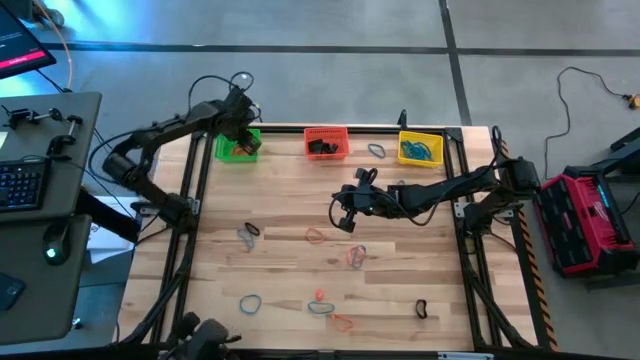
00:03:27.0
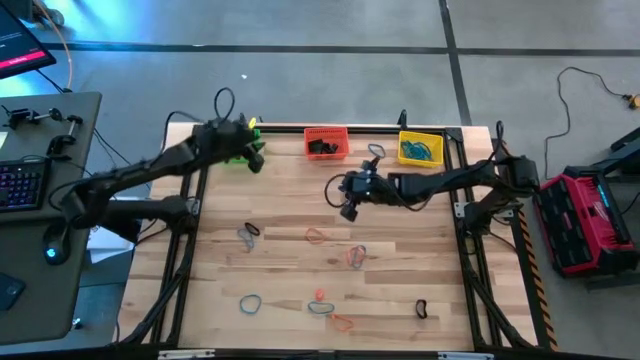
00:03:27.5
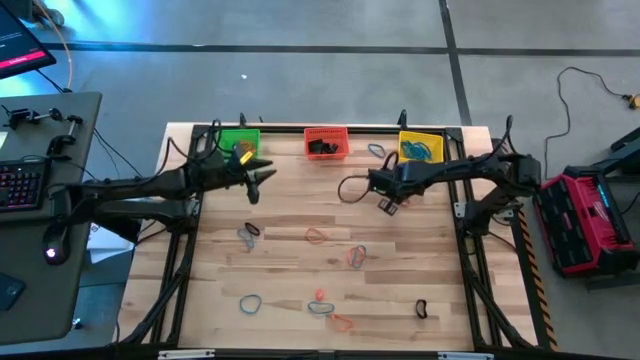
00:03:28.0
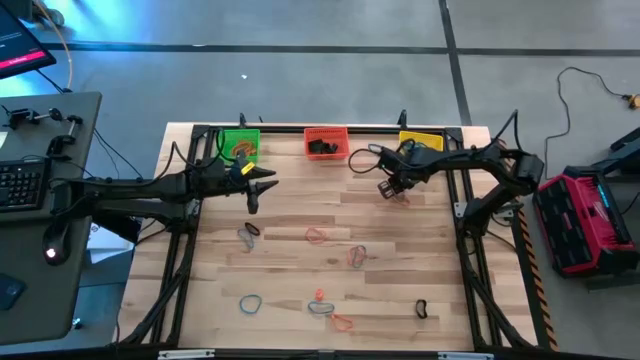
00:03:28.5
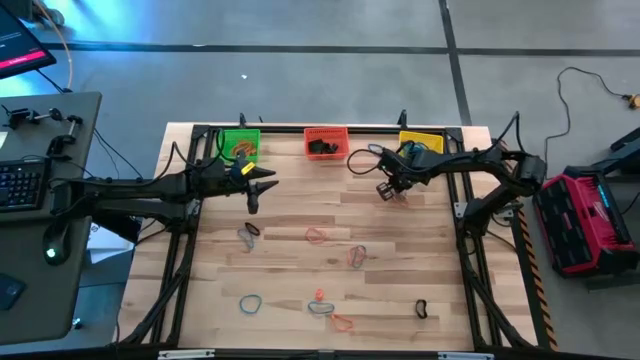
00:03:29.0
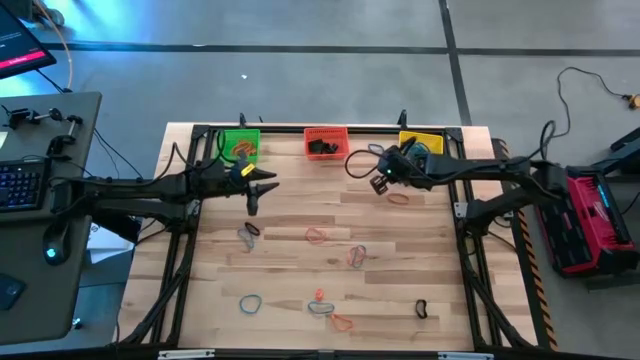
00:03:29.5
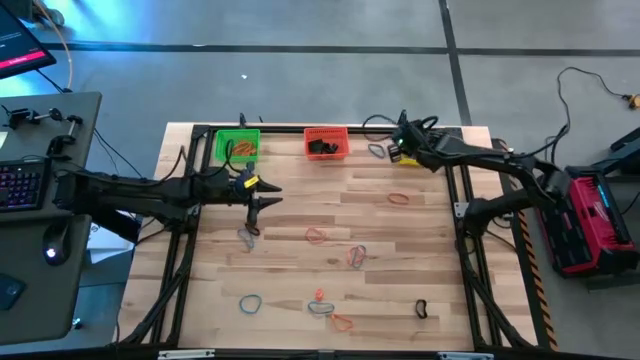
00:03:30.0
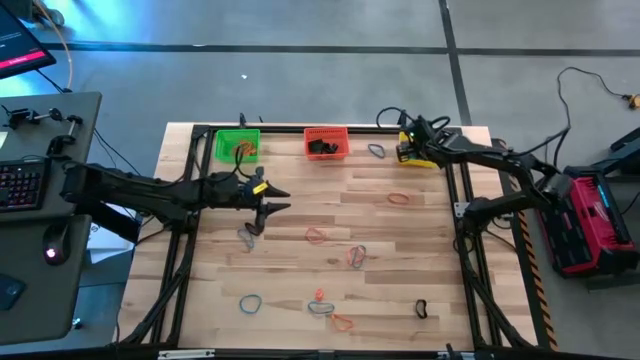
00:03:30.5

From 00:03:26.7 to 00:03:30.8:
Task: Sort rubber bands into baskets
Put the blue rubber band into the yellow bin

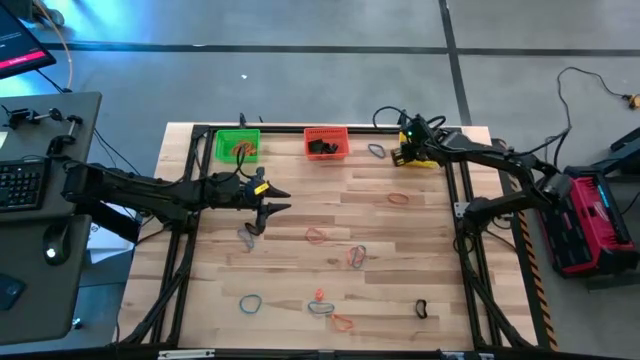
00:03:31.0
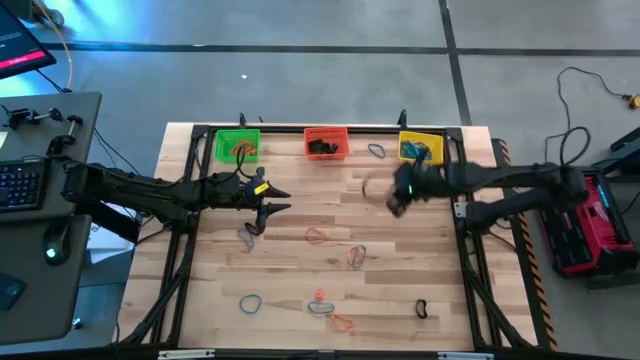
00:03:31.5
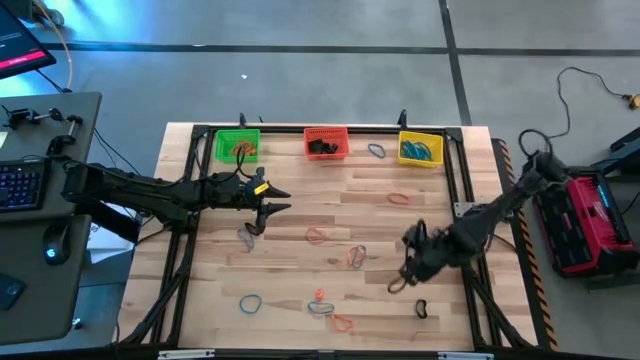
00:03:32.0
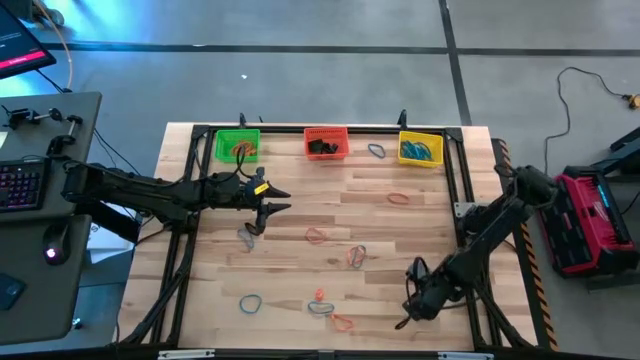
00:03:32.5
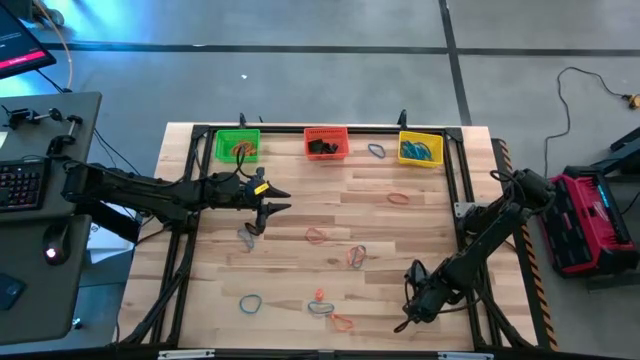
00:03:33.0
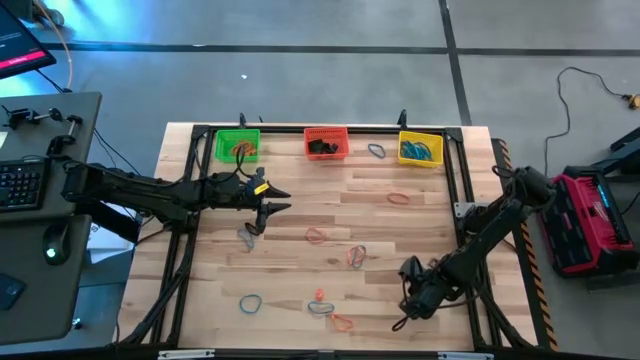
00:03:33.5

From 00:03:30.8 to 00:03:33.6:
Put the black rubber band into the orange bin

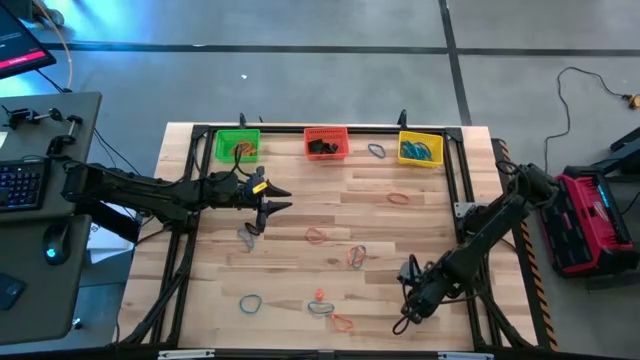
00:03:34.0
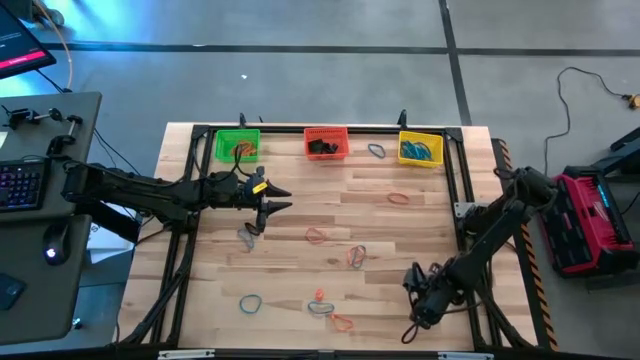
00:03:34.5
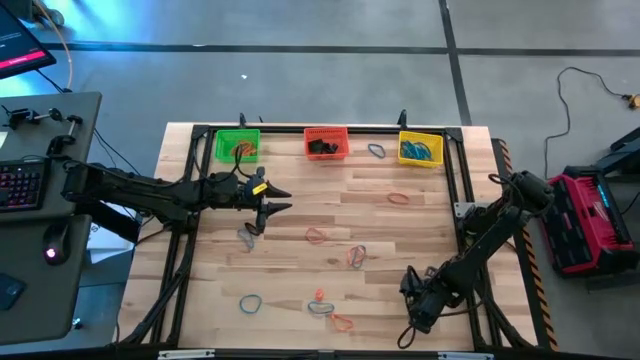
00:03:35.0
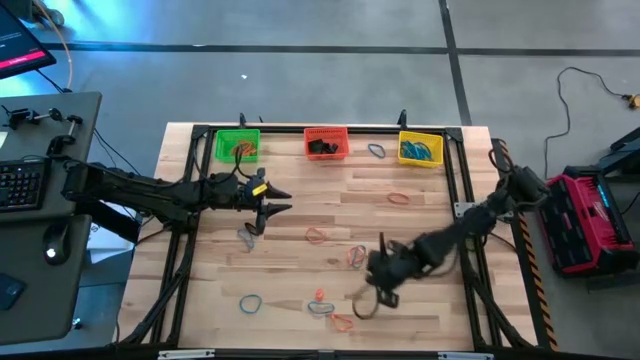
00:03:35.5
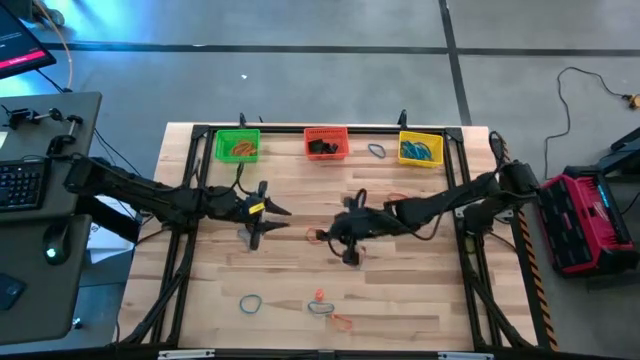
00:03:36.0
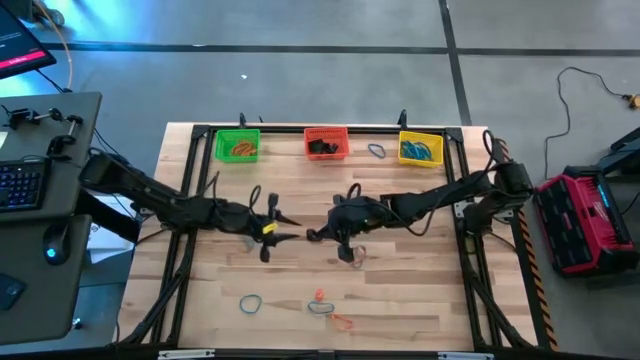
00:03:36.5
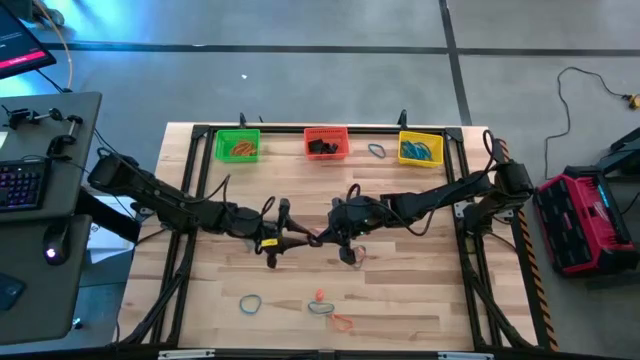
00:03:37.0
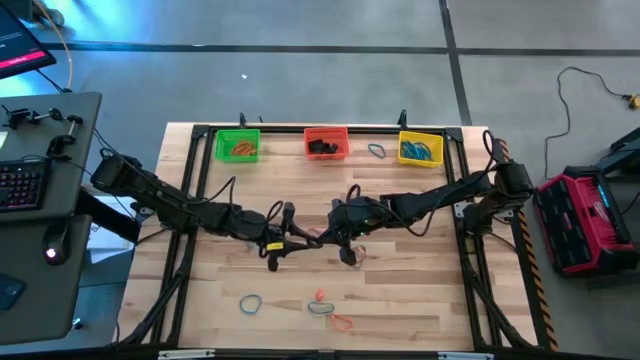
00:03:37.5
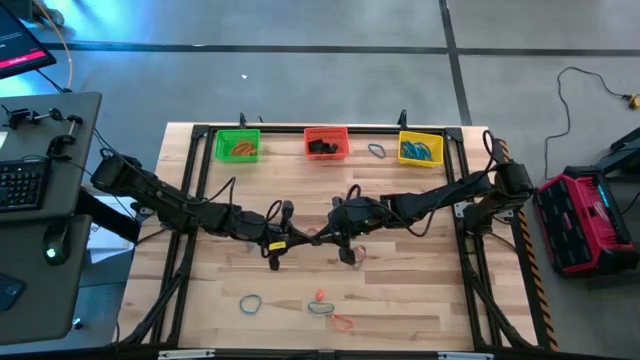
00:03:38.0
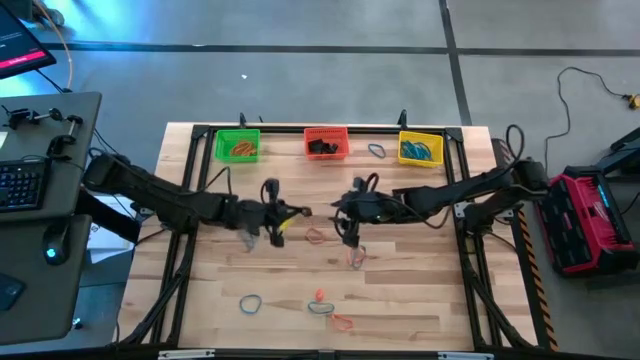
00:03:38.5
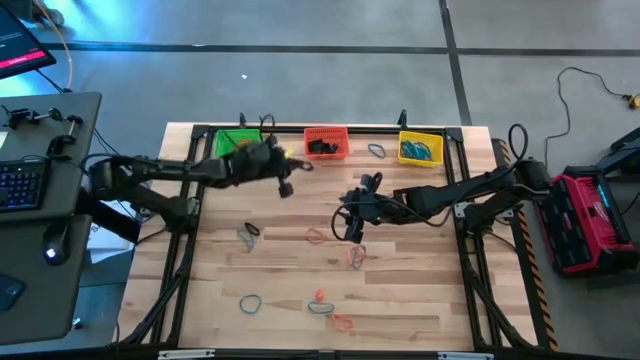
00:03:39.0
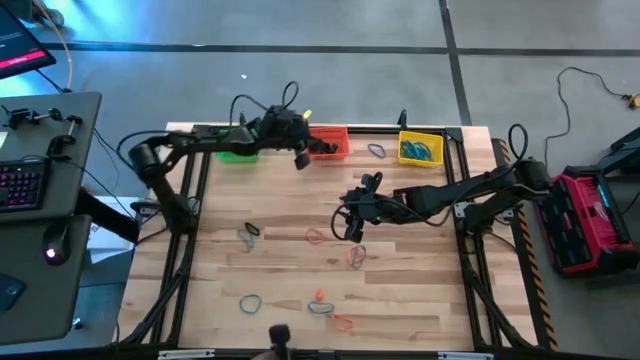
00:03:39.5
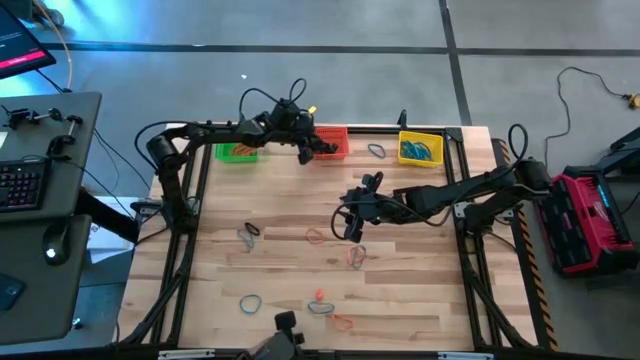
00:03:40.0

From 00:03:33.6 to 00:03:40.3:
Put the black rubber band into the orange bin

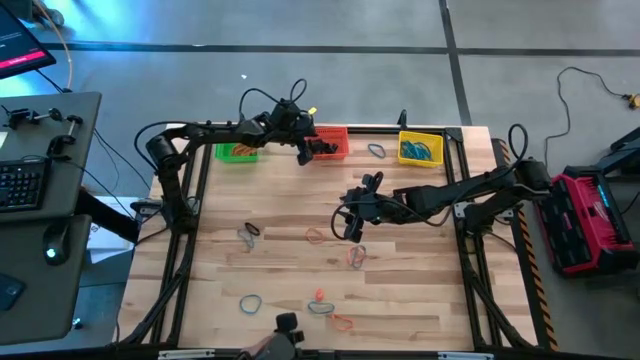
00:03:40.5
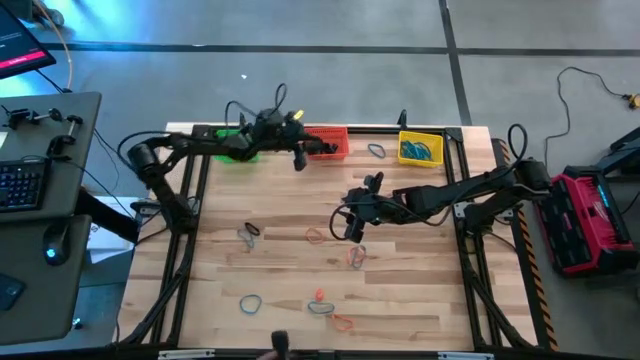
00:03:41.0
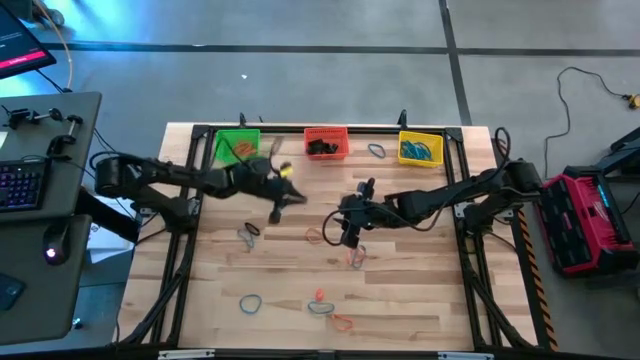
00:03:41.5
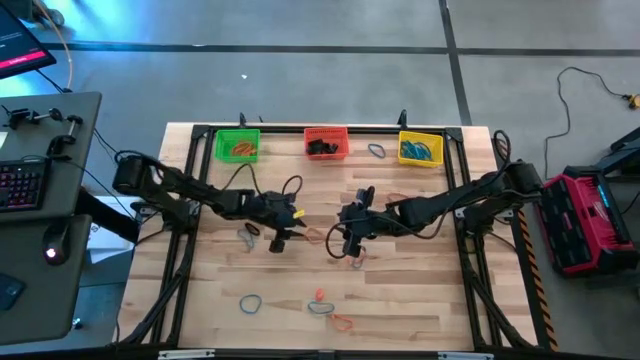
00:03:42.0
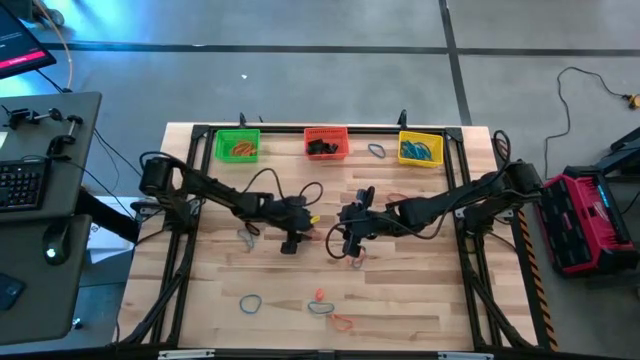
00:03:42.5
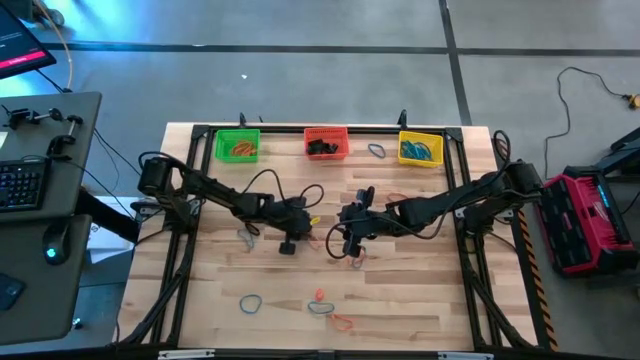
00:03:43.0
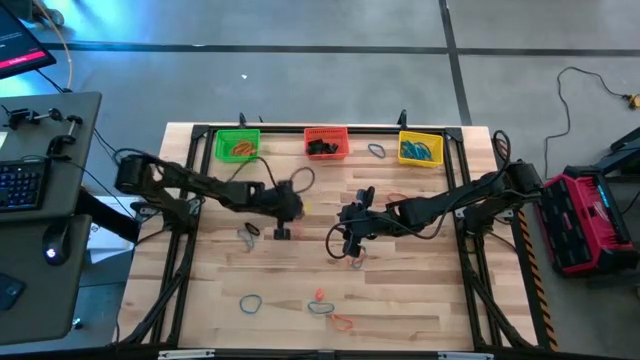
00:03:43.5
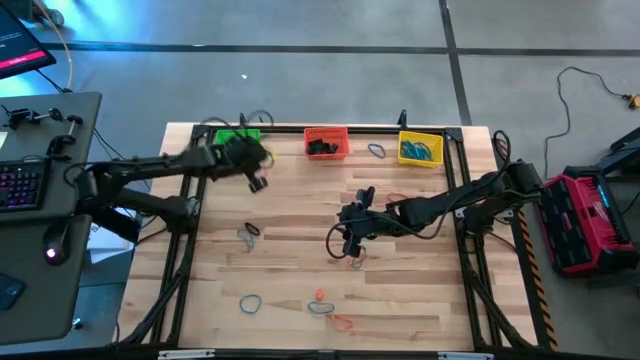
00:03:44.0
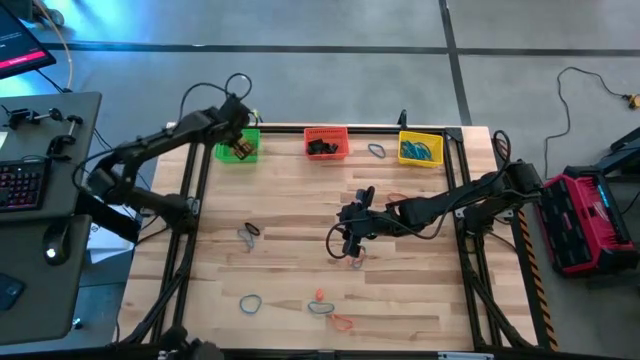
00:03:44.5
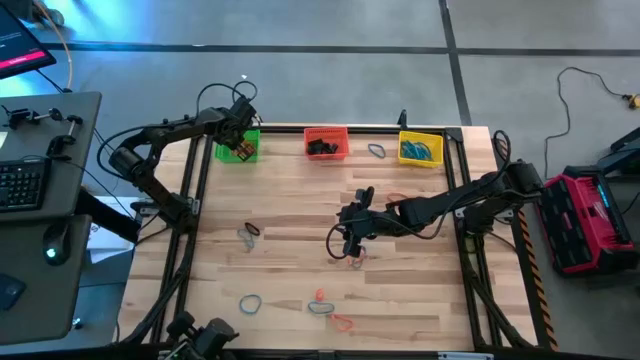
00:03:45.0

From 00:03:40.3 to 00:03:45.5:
Put the orange rubber band into the green bin

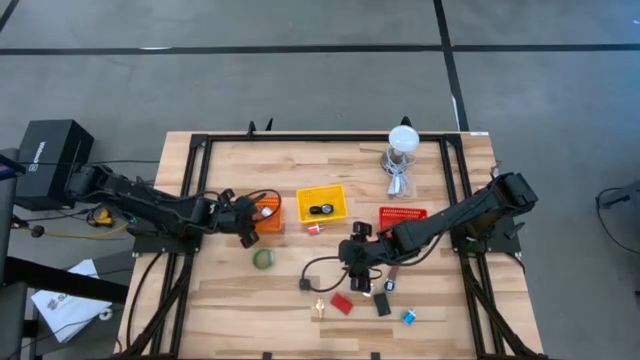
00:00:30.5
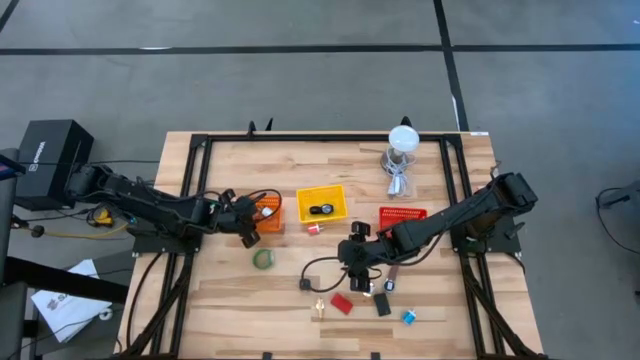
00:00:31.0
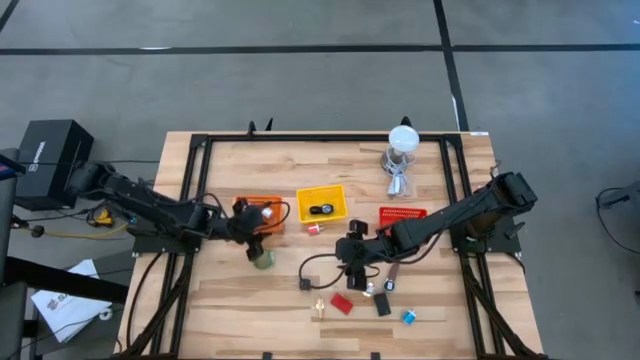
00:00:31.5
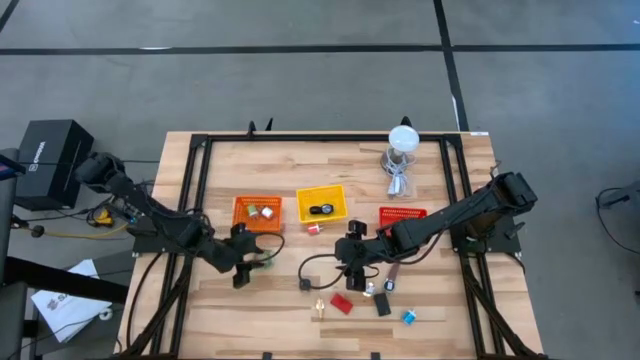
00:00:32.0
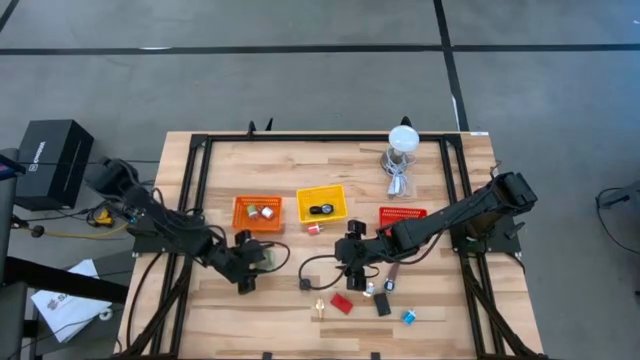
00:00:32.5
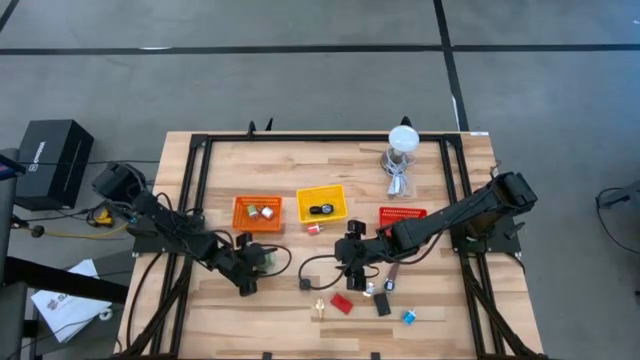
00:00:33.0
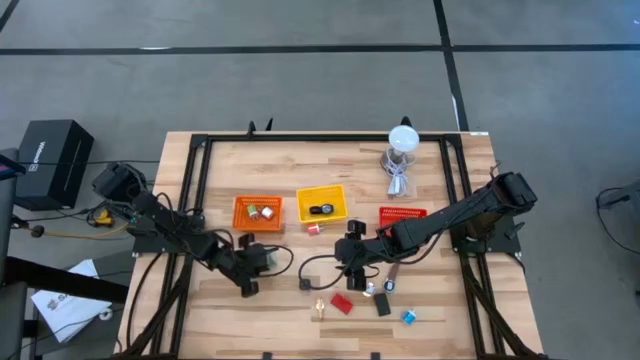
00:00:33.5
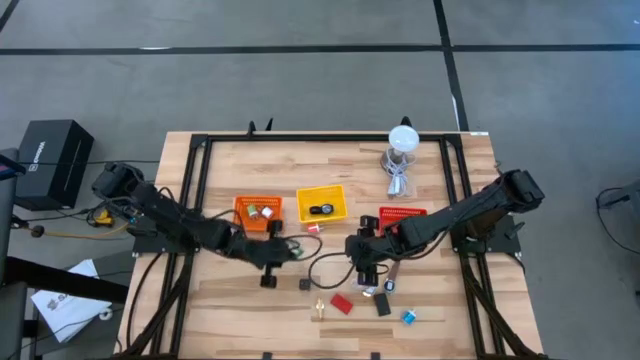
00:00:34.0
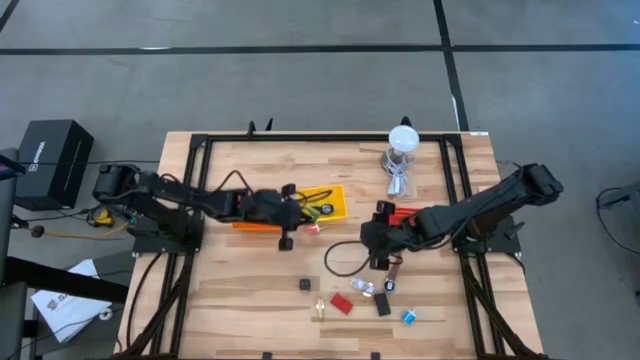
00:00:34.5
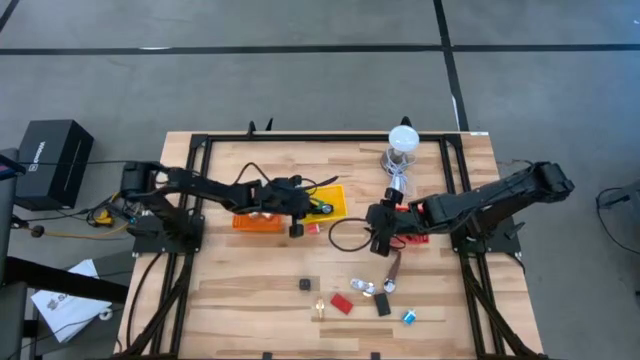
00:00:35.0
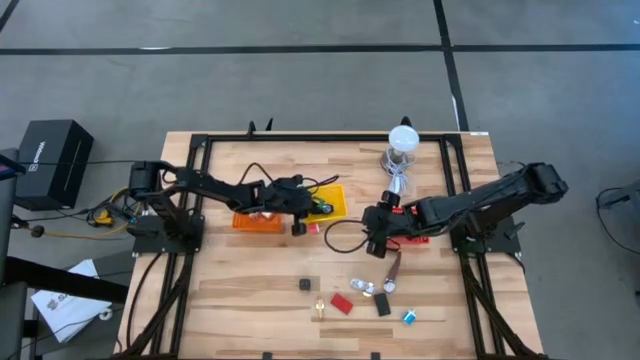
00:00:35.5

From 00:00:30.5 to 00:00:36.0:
Task: Pick & Place Office items
Put the green wristwatch into the yellow bin
